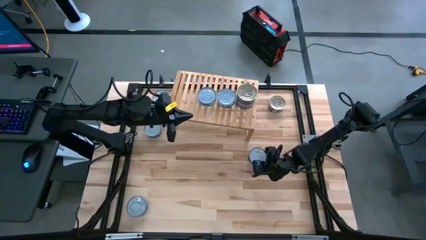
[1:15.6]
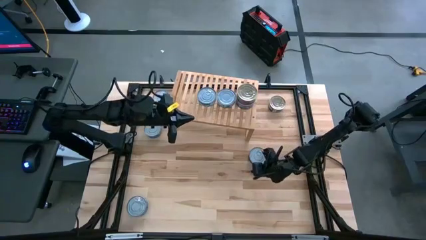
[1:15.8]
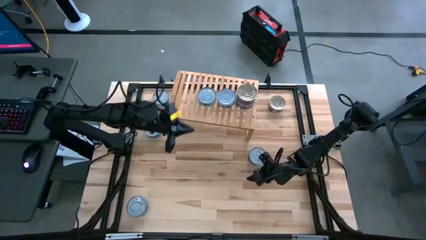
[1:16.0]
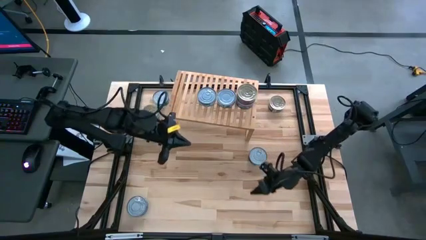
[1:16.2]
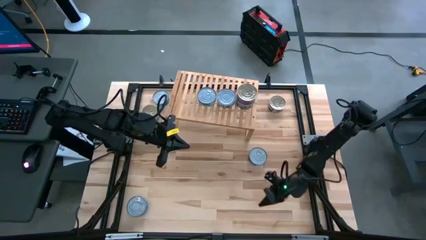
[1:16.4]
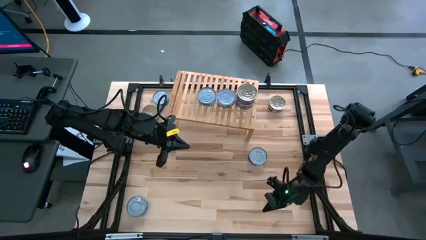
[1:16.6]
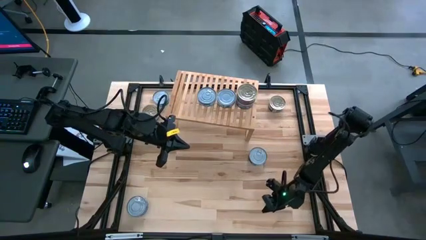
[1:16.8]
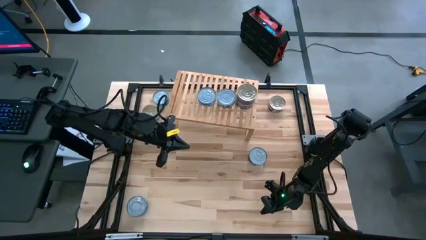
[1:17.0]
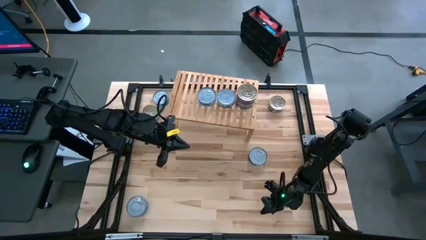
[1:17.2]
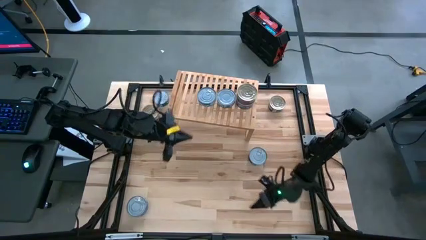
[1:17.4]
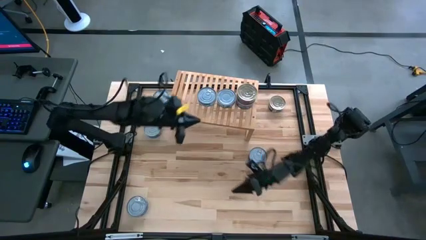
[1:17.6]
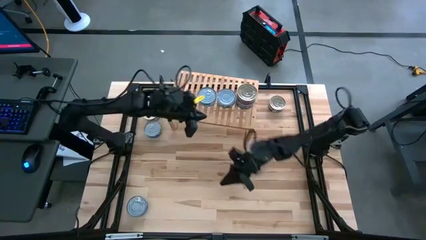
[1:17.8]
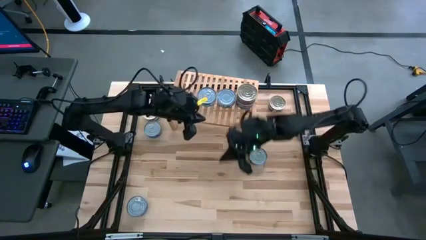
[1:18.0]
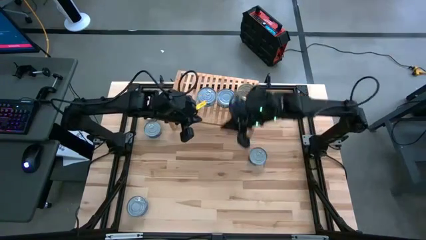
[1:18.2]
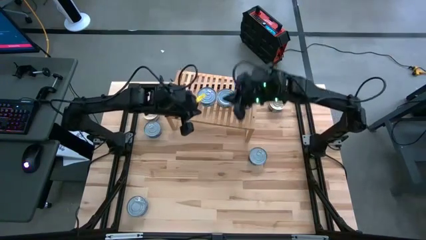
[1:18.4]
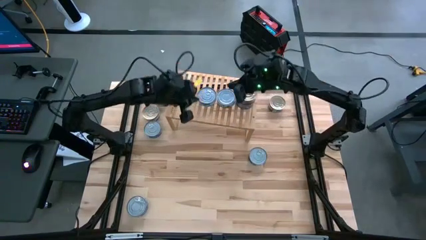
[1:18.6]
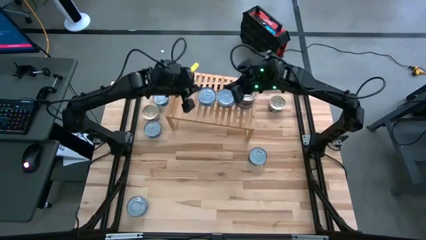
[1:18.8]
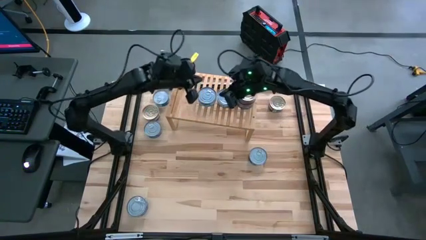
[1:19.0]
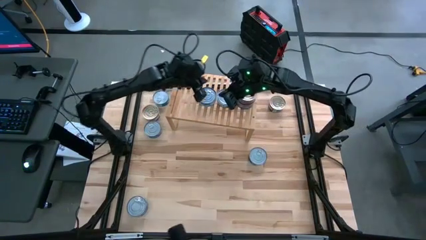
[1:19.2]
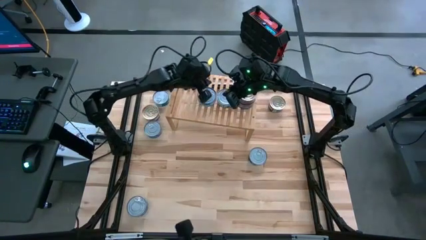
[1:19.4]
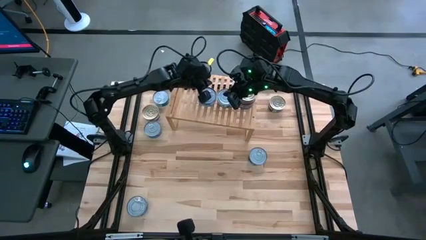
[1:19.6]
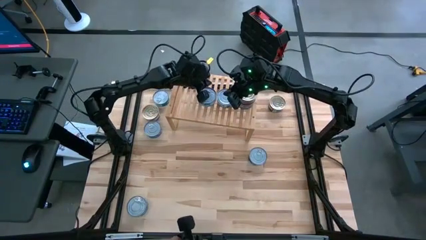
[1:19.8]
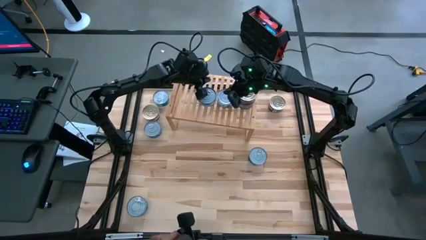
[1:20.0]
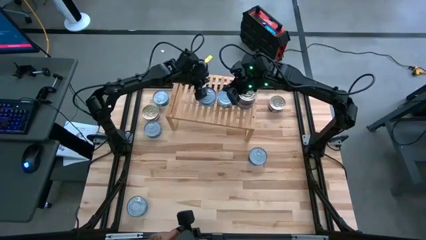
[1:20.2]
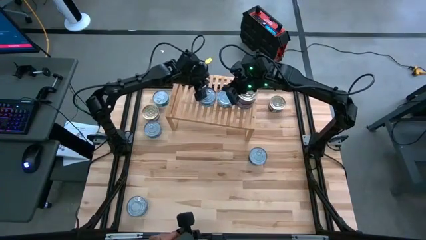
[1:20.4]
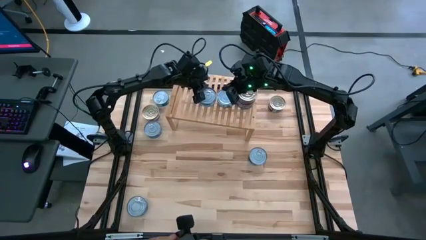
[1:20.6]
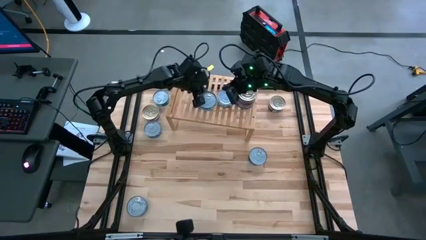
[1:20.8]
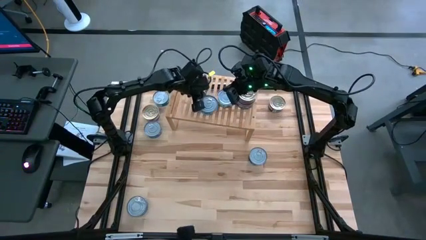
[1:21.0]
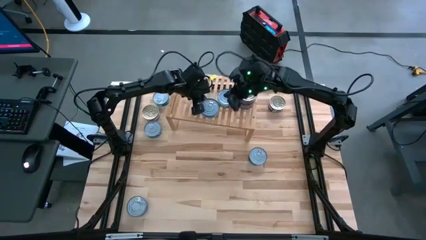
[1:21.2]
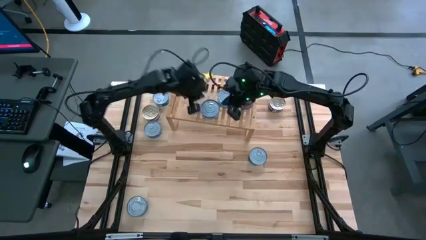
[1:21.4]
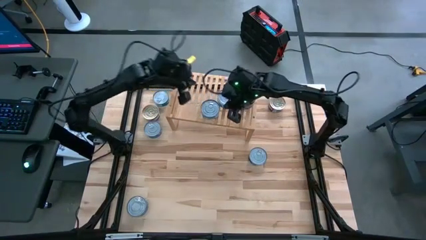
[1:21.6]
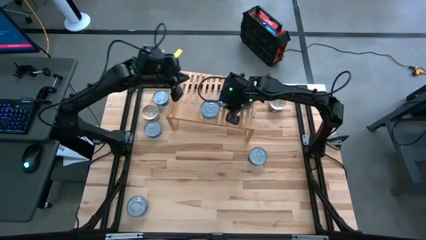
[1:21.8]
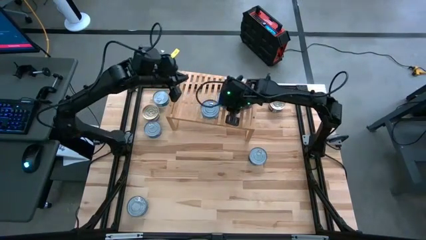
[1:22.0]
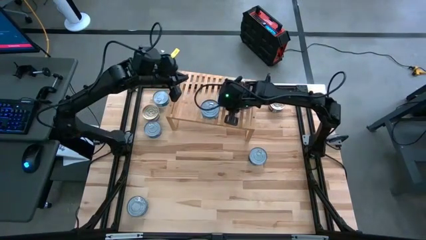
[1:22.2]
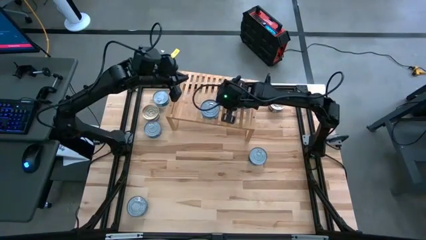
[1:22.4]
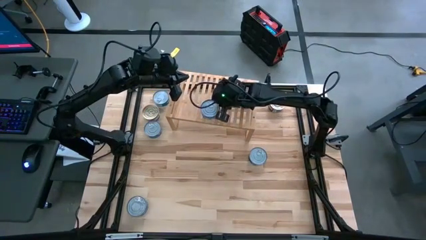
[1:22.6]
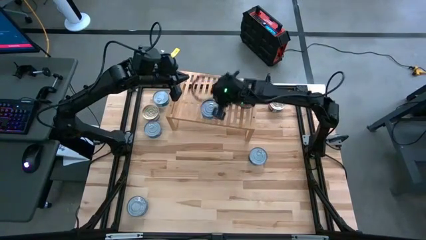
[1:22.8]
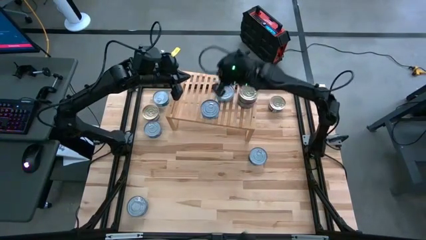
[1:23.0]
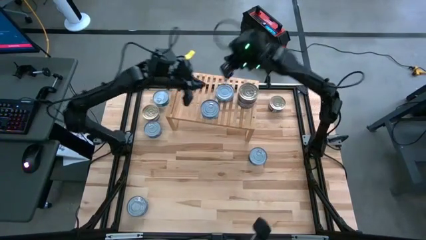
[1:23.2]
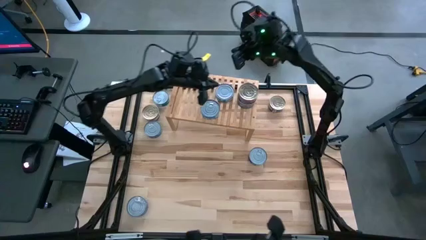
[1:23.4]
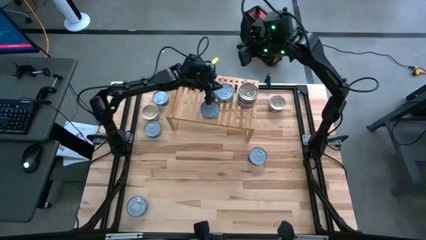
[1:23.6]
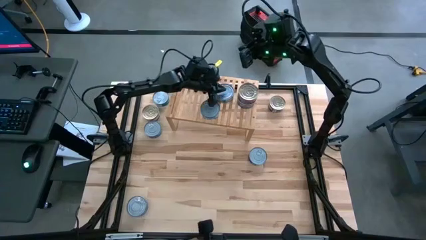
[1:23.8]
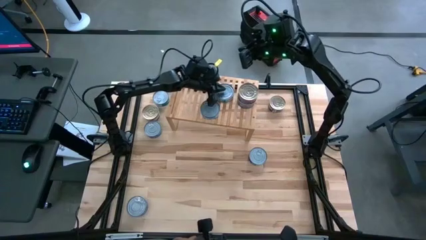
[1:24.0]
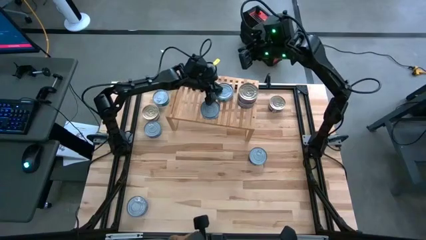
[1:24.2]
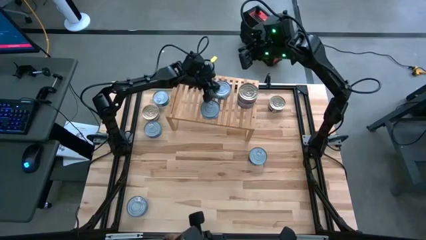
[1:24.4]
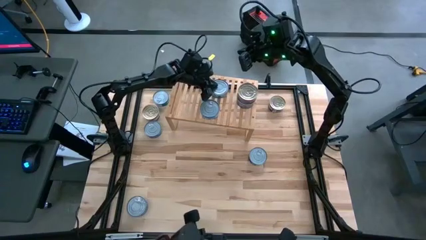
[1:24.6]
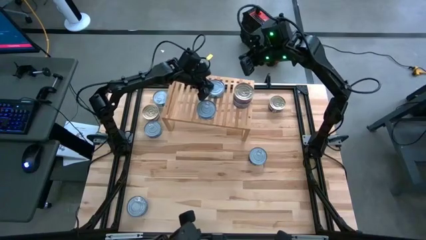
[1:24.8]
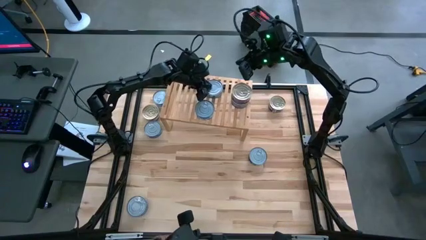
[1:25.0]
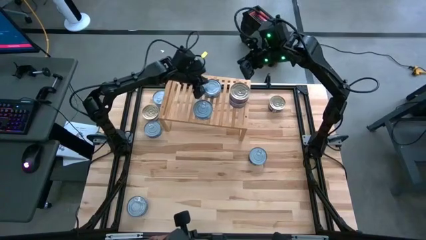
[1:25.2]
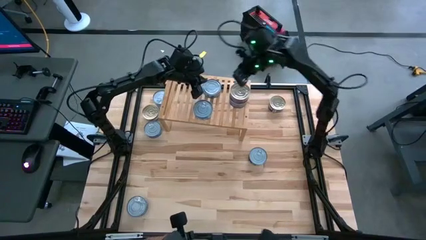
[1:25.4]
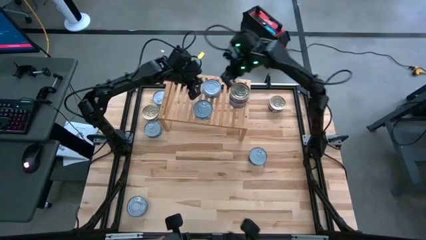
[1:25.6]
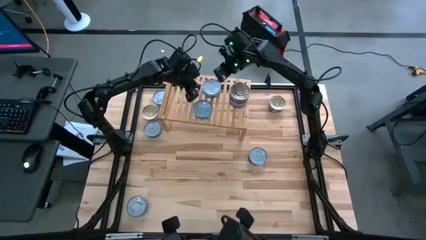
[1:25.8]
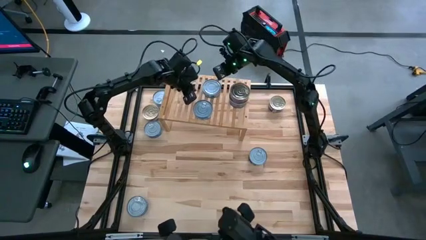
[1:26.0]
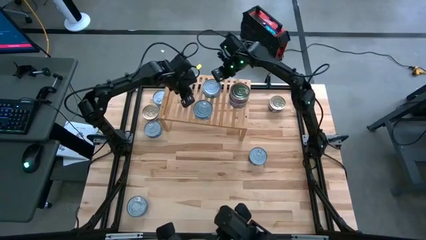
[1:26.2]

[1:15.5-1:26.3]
Task: Stack canned seafood by type on shelf
Adjust the tuna cans on the shelf

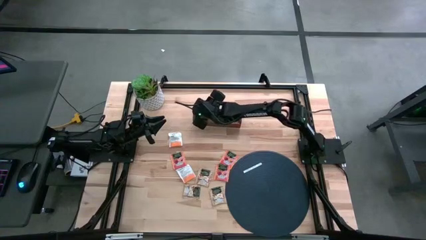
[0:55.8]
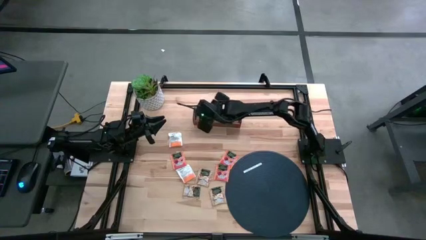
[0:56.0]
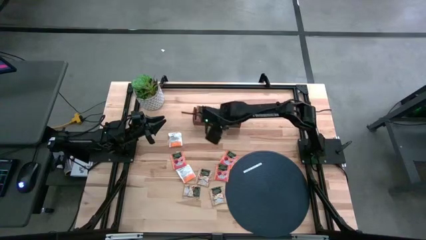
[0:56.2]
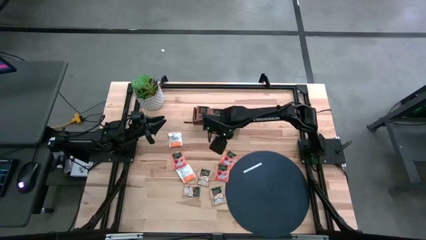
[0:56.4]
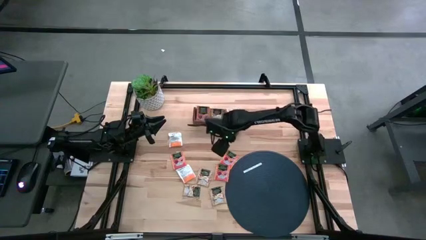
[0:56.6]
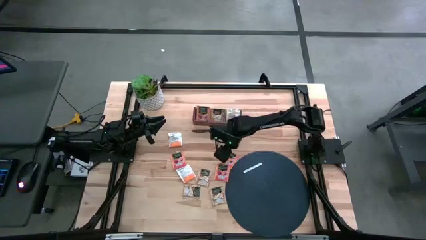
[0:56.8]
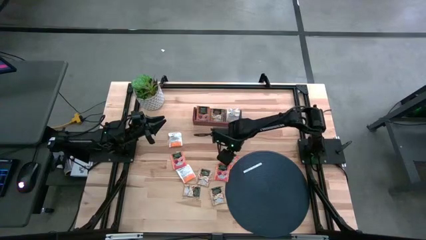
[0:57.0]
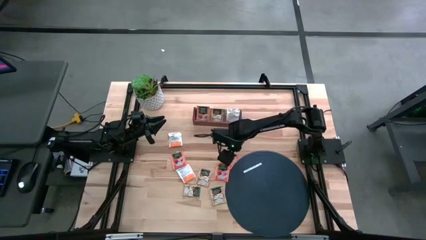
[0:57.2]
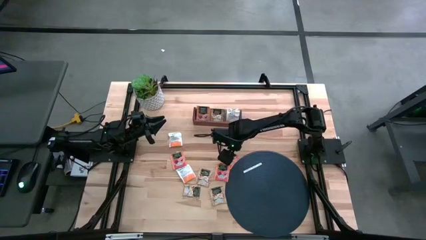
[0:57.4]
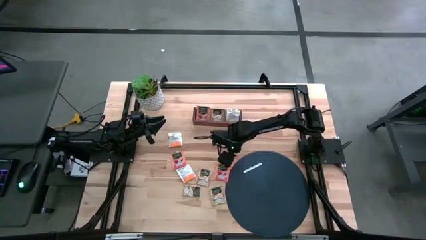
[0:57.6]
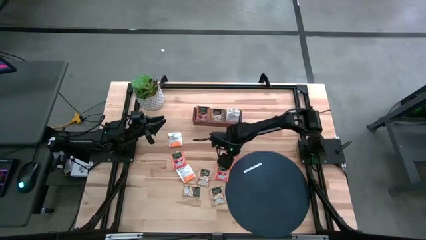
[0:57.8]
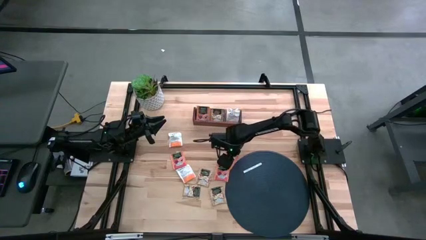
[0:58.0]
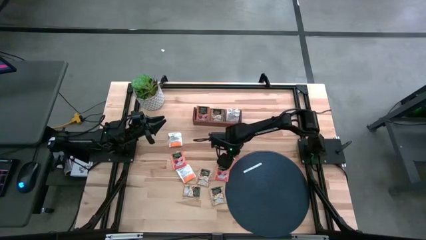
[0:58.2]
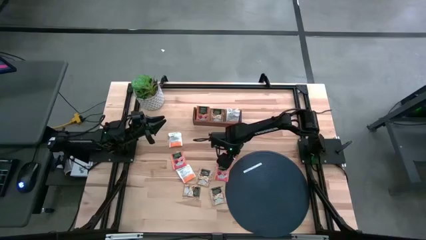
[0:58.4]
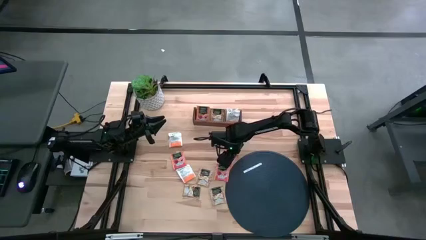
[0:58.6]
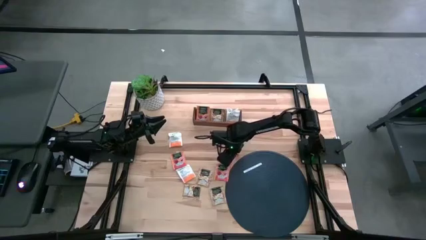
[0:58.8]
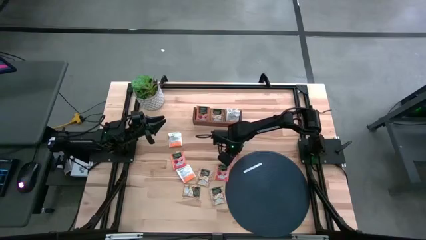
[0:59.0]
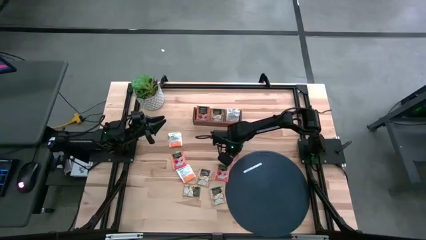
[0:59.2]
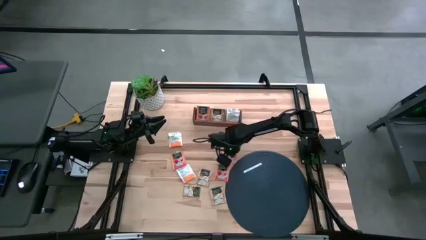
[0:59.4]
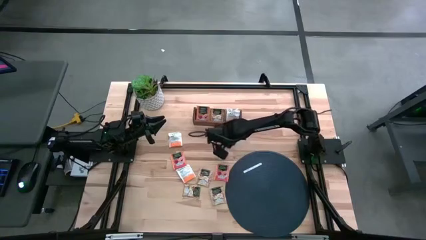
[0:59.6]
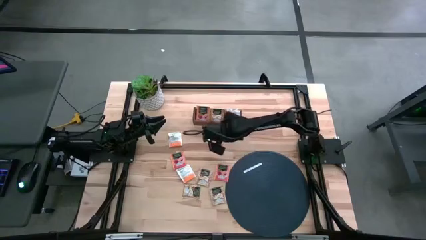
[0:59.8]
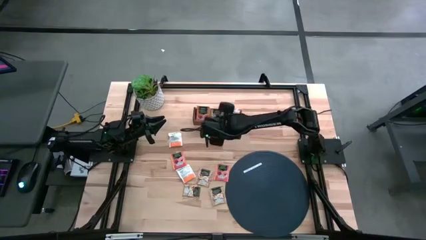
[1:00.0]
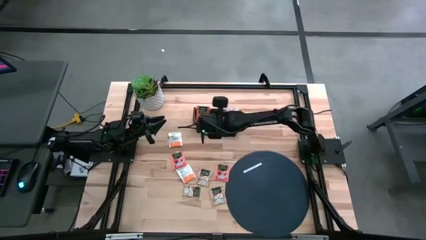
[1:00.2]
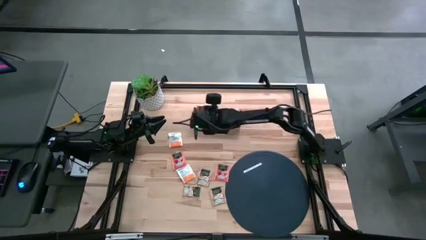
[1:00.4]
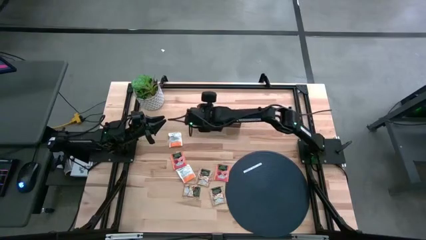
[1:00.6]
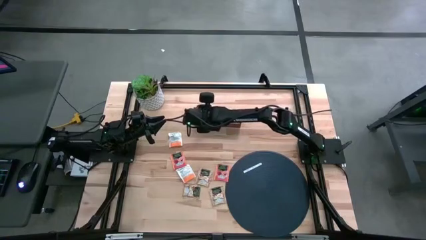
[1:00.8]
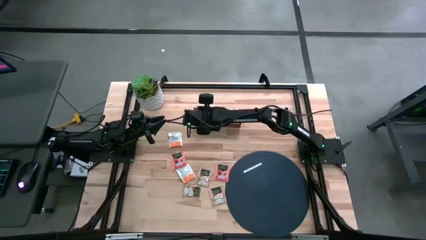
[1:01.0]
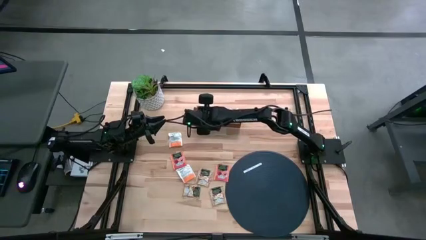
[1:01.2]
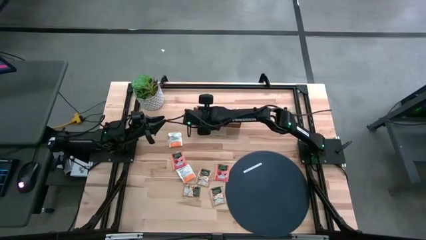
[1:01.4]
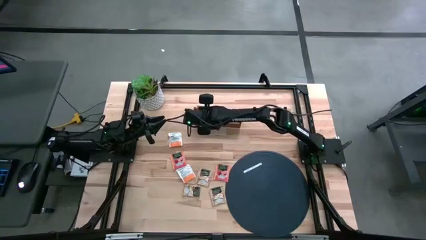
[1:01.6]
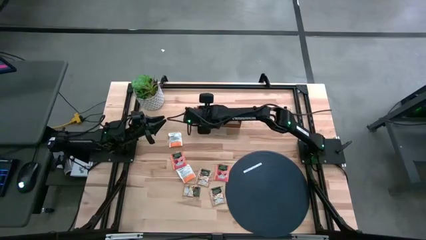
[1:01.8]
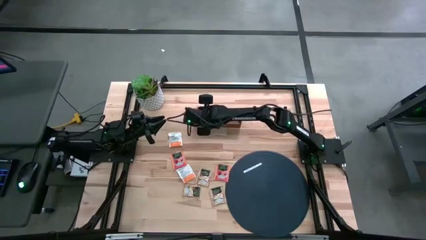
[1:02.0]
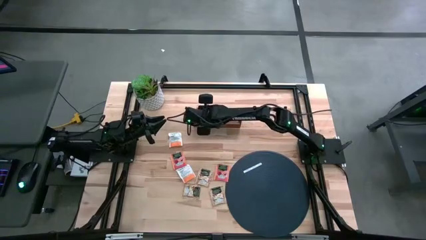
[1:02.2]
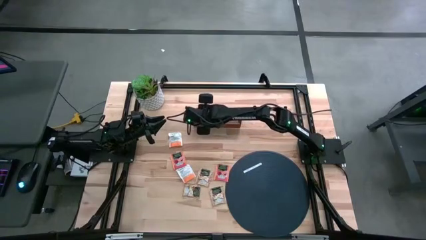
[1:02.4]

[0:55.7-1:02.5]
Task: Pick & Place Tea
Put the red orange tea sachet into the left section of the wooden organizer
